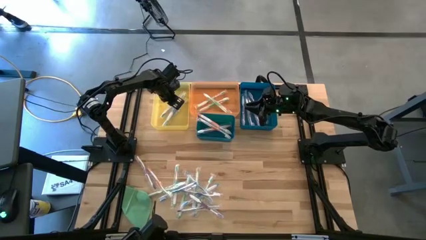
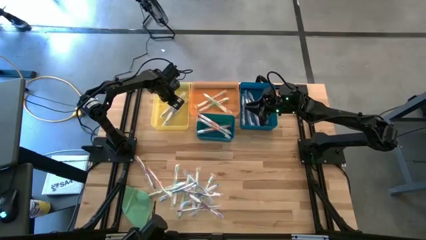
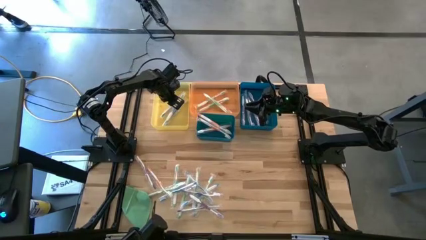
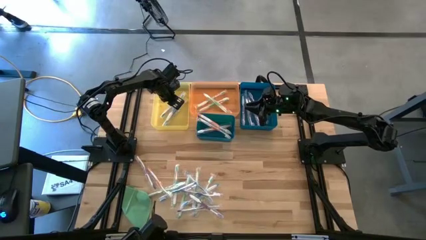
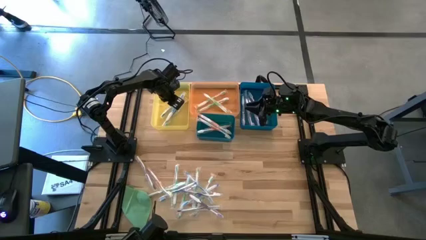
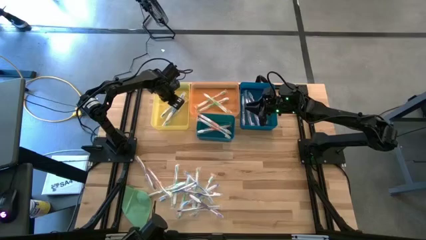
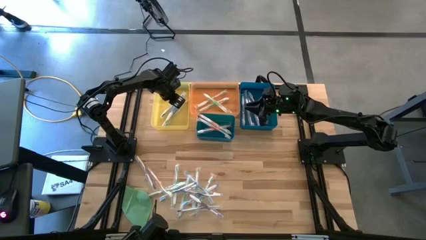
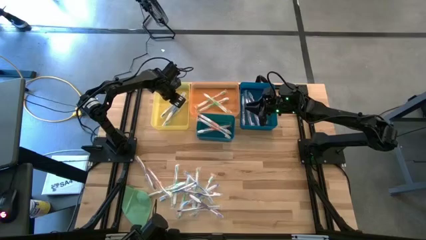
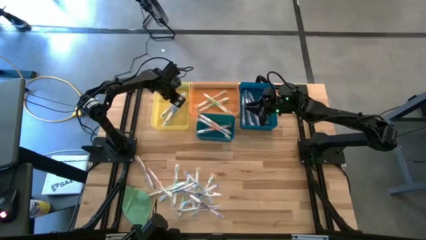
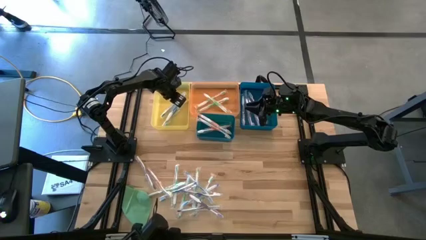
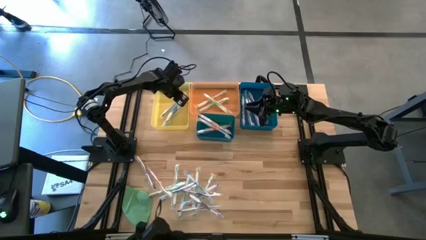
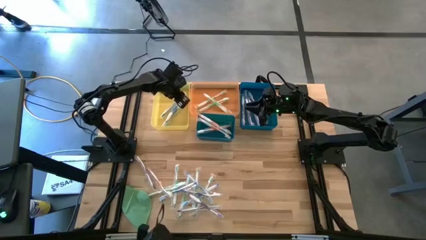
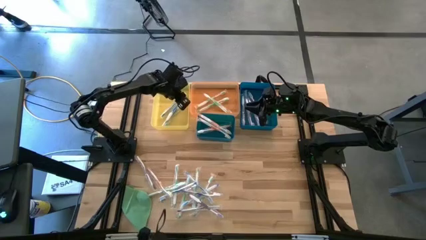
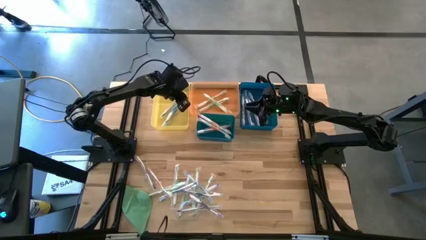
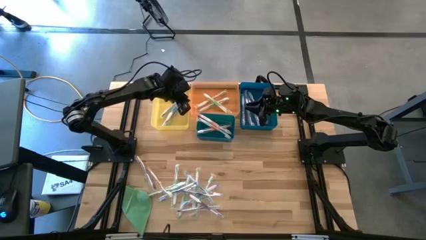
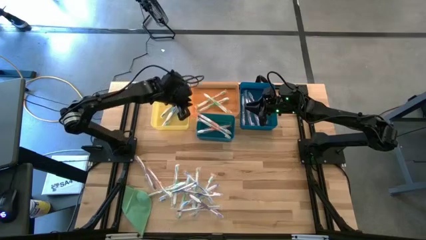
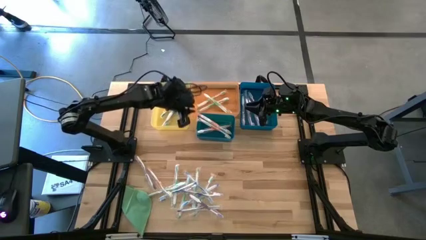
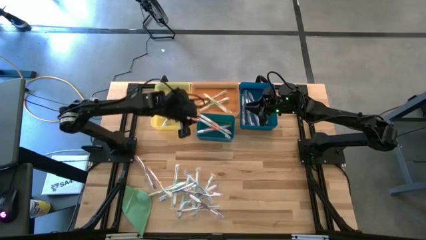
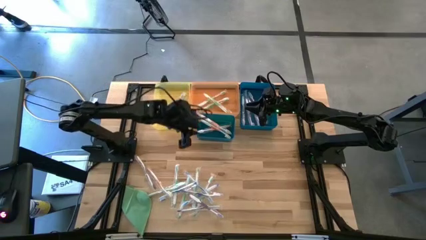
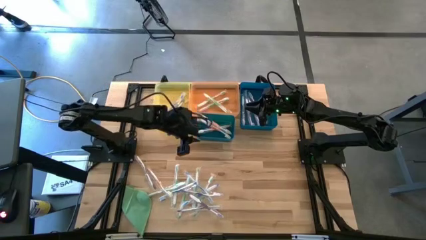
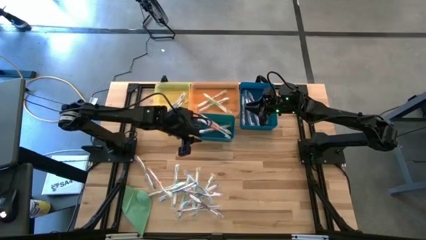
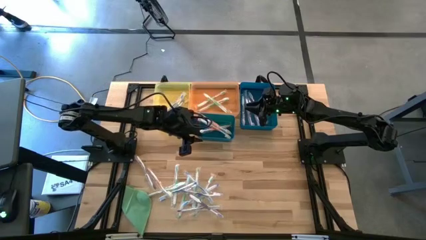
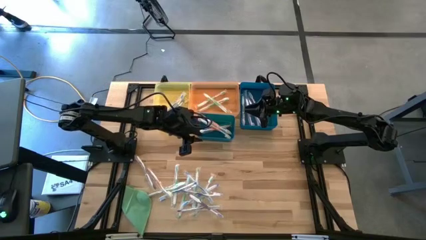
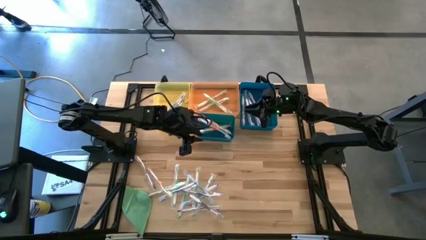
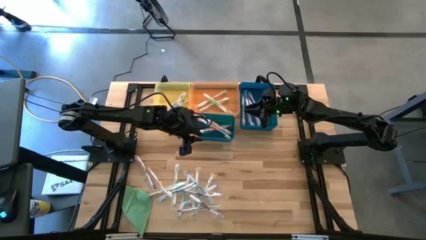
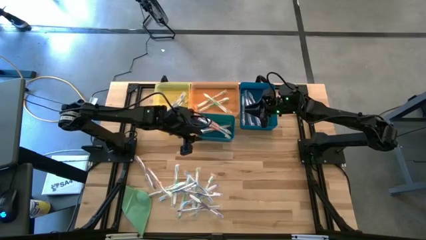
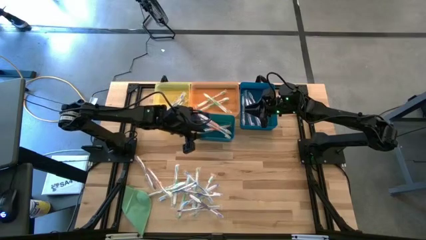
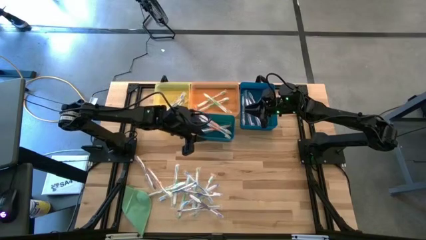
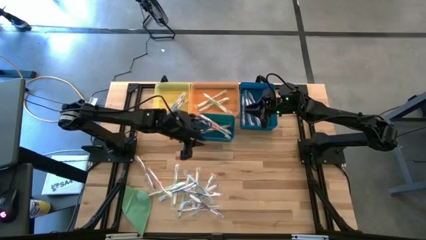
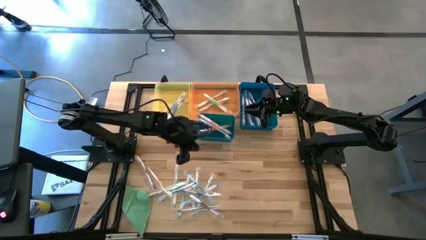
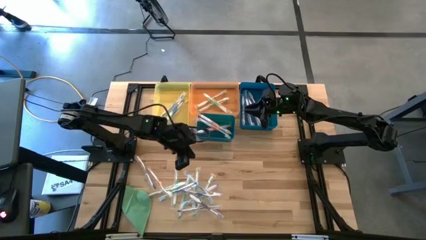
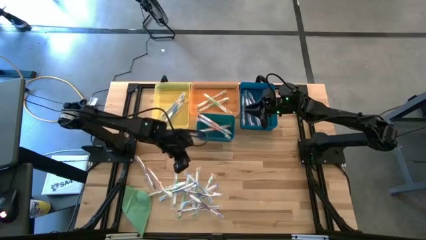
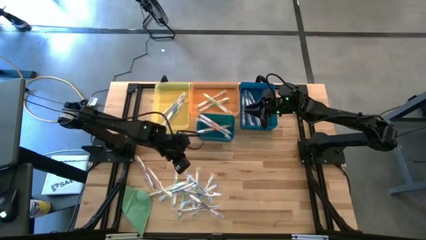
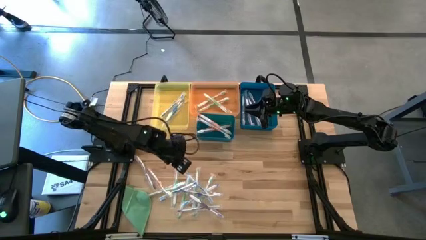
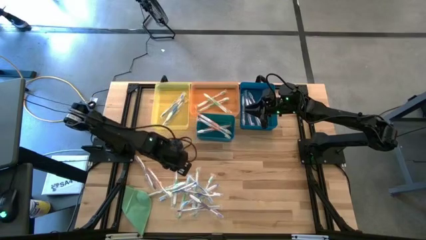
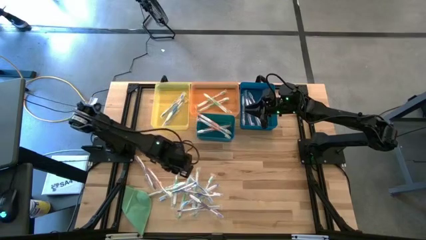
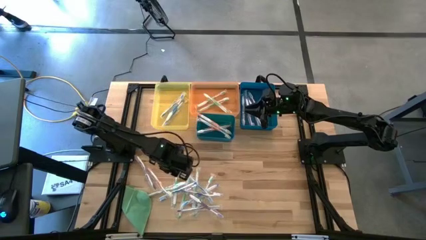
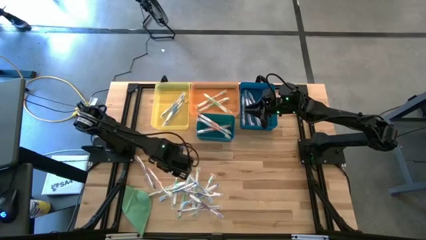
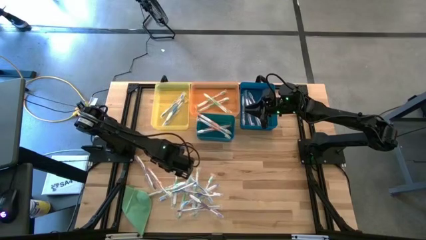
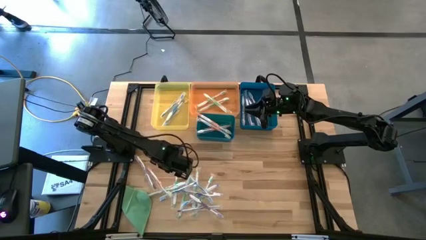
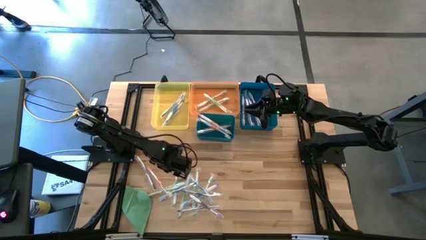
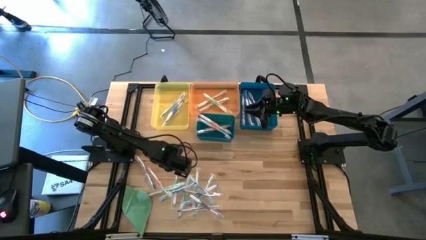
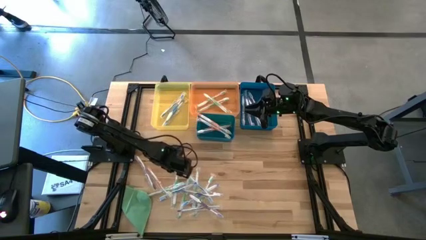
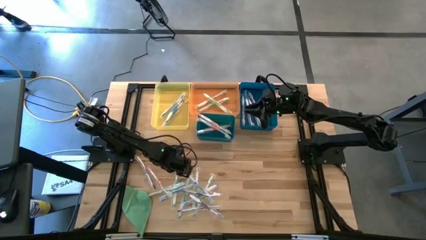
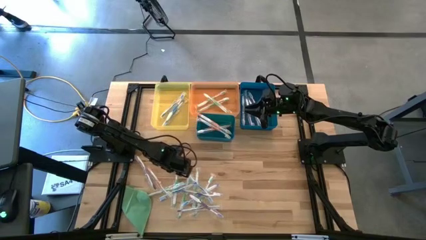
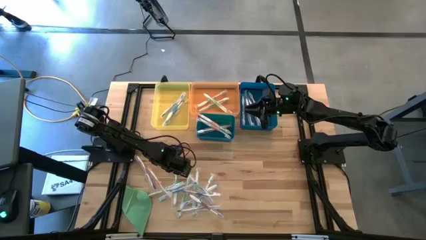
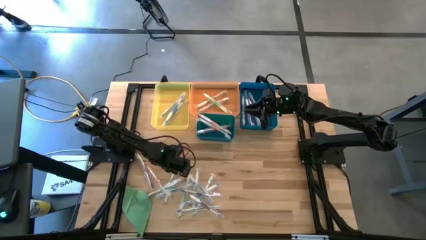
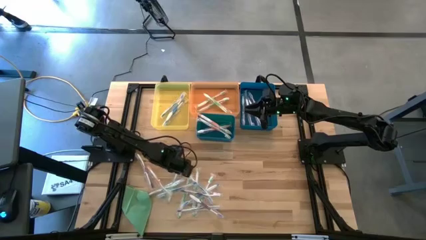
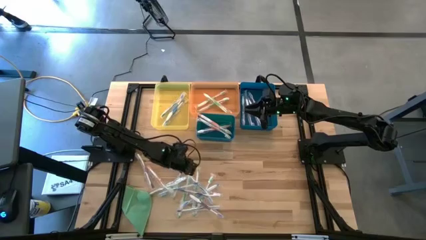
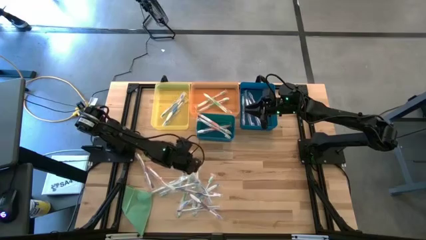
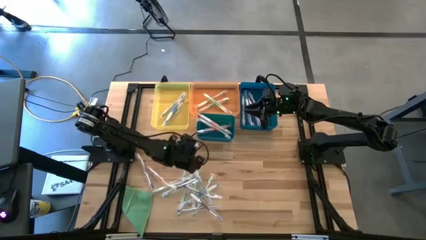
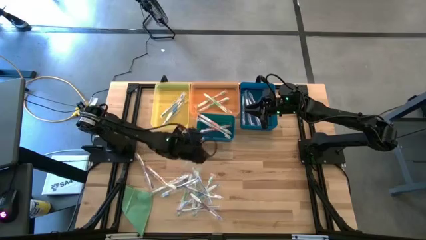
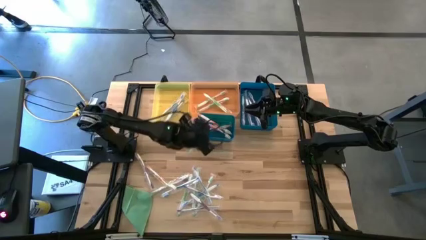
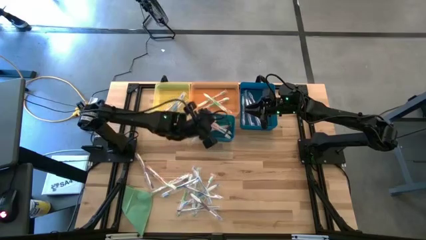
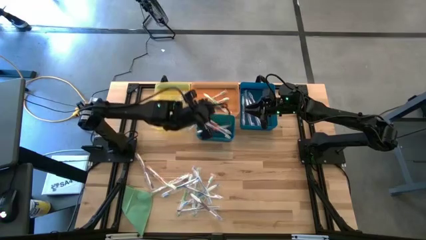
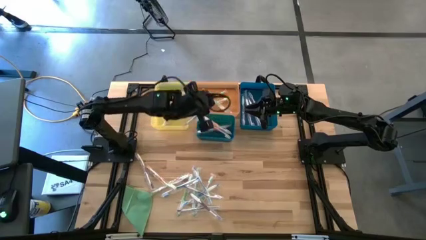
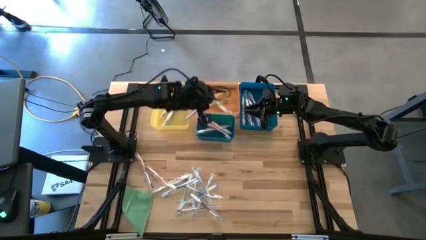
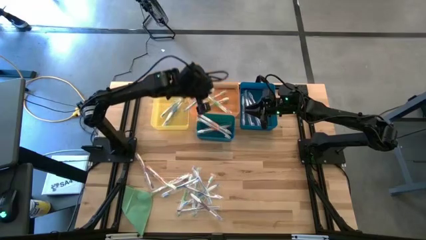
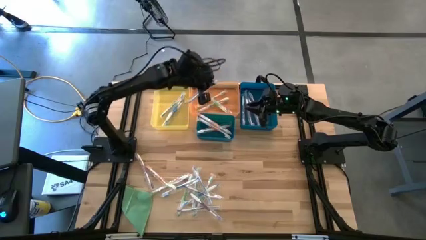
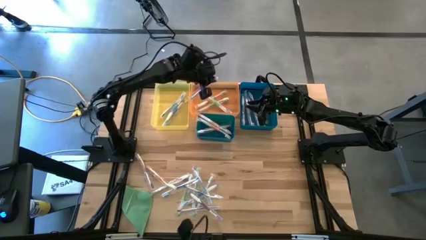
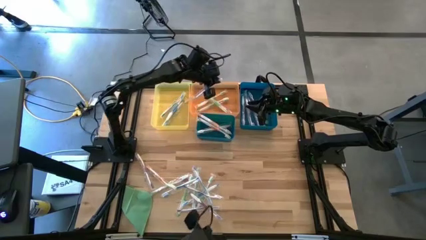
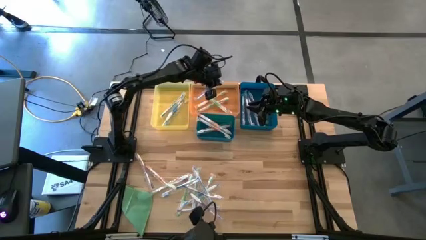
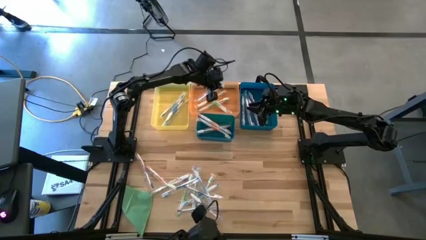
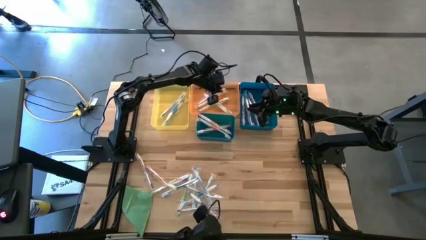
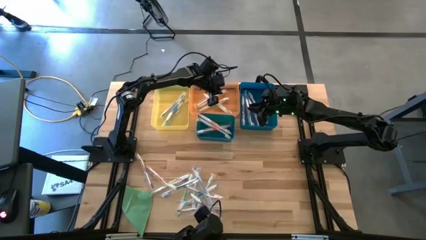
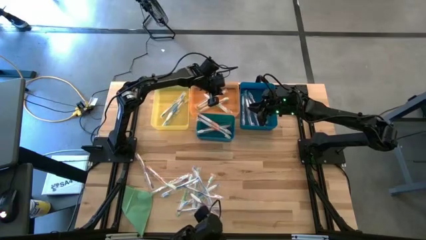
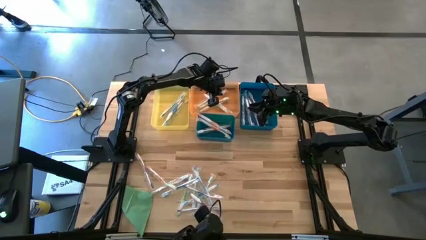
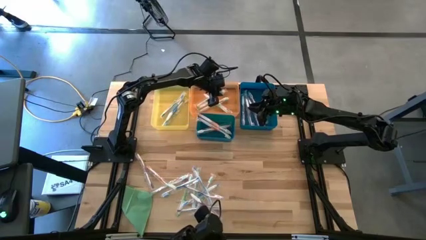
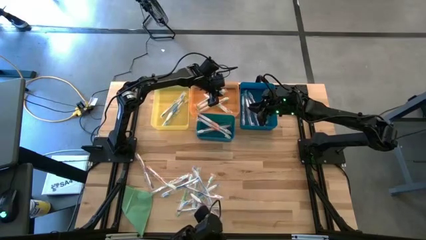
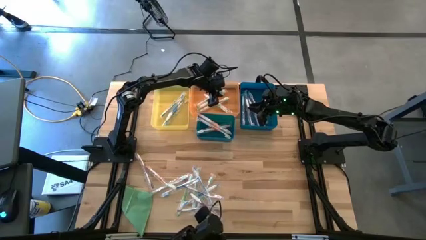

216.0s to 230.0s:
Task: Pick & Place Toothbrushes
Put the green toothbrush into the orange bin
